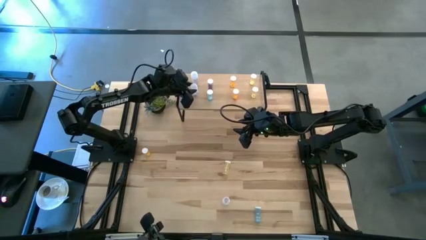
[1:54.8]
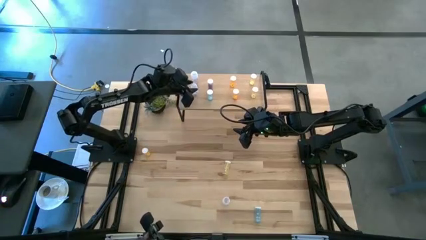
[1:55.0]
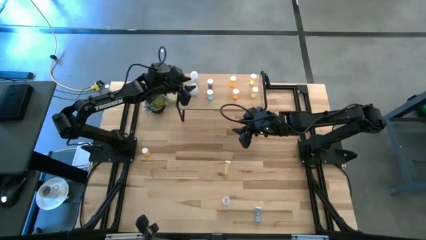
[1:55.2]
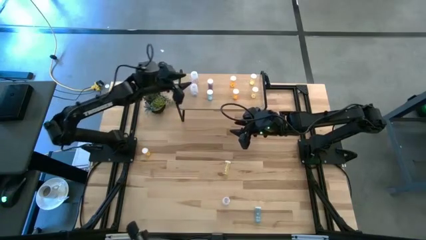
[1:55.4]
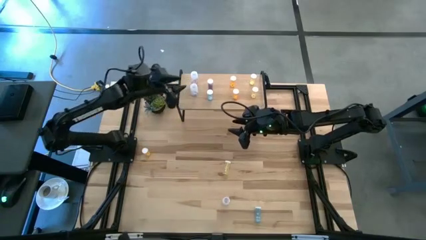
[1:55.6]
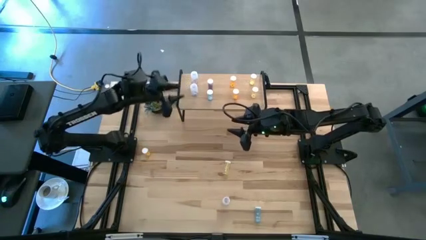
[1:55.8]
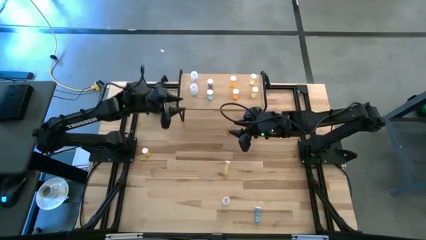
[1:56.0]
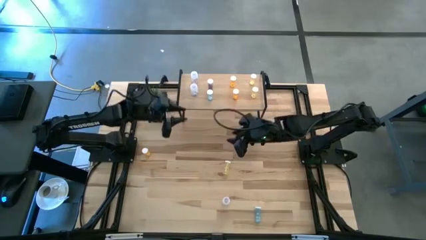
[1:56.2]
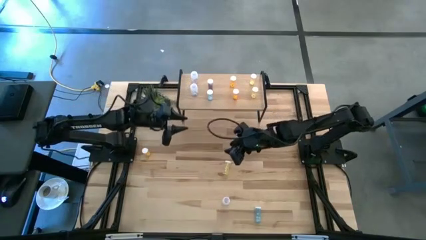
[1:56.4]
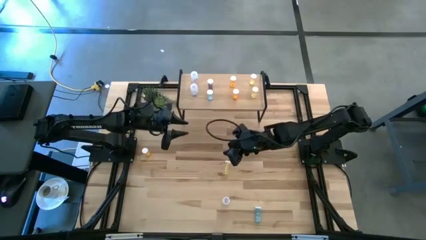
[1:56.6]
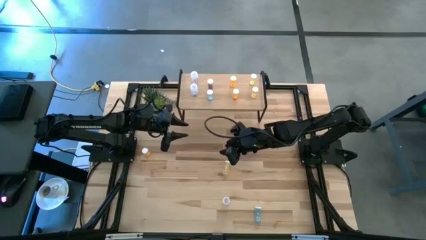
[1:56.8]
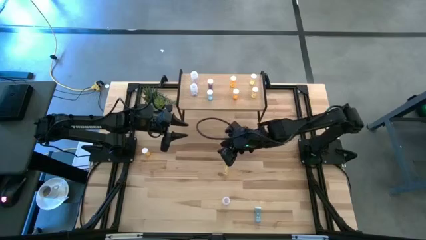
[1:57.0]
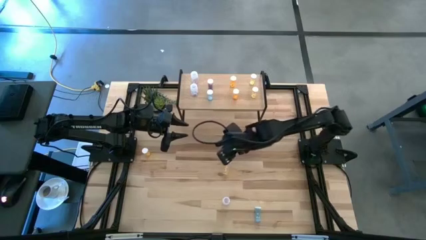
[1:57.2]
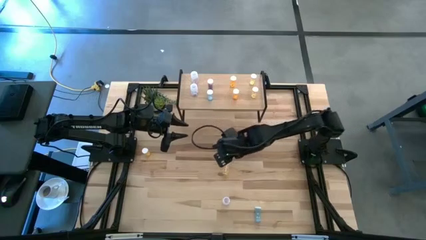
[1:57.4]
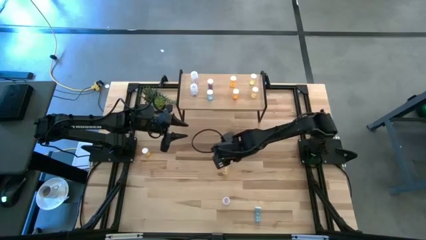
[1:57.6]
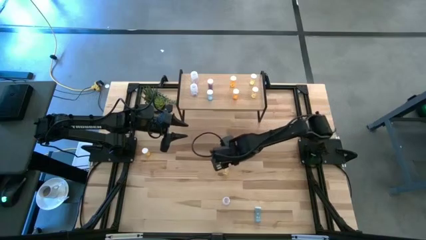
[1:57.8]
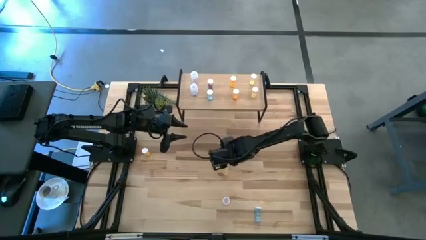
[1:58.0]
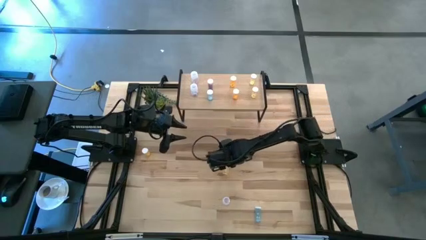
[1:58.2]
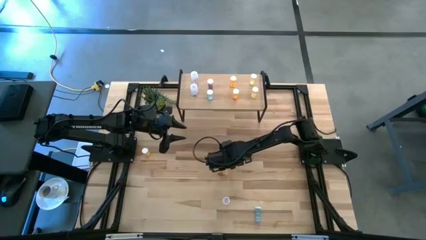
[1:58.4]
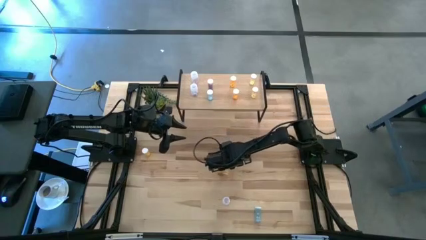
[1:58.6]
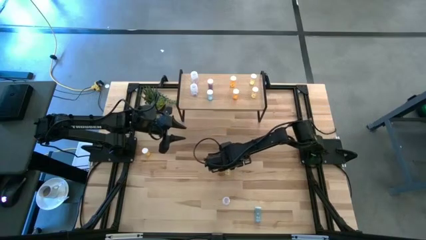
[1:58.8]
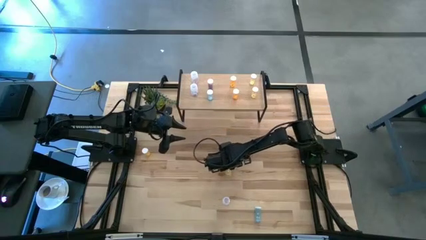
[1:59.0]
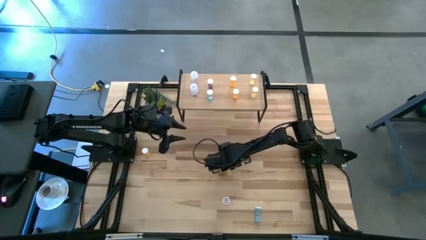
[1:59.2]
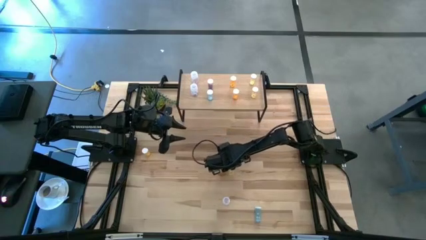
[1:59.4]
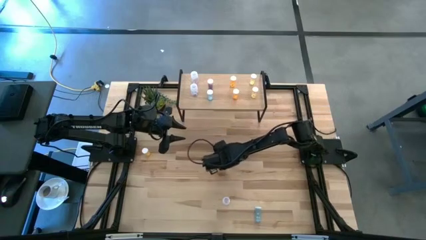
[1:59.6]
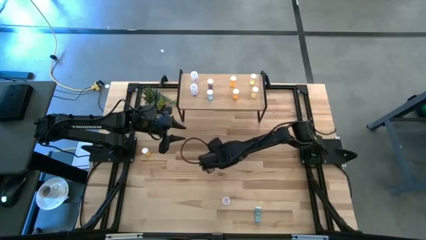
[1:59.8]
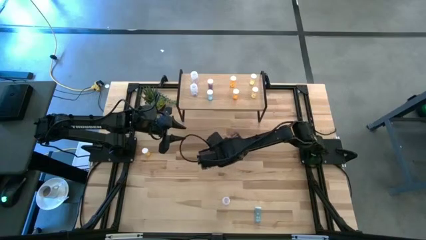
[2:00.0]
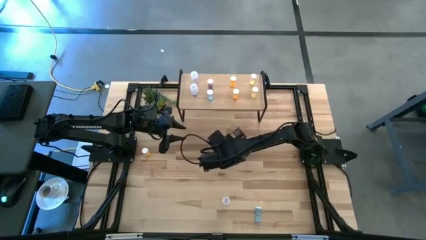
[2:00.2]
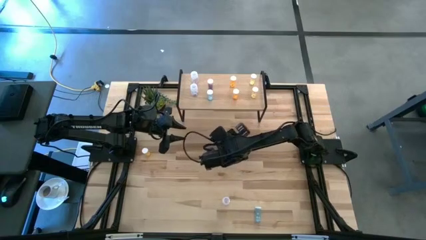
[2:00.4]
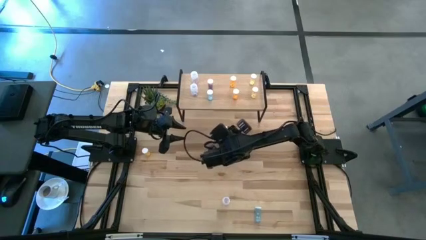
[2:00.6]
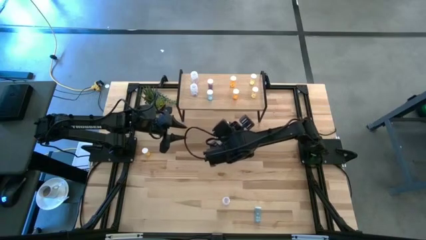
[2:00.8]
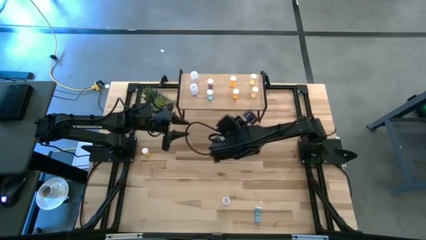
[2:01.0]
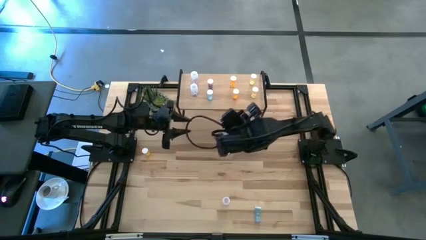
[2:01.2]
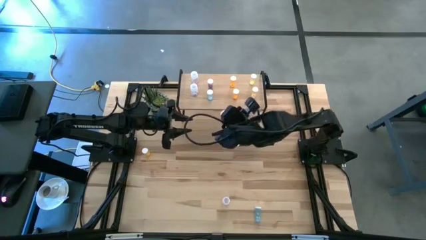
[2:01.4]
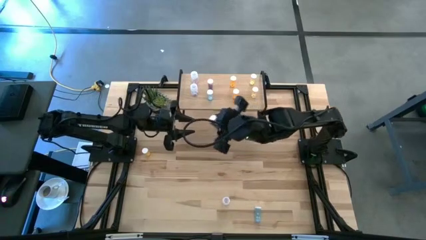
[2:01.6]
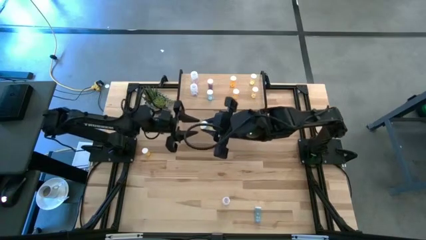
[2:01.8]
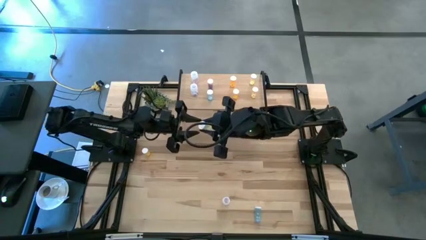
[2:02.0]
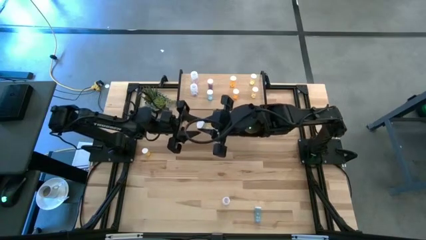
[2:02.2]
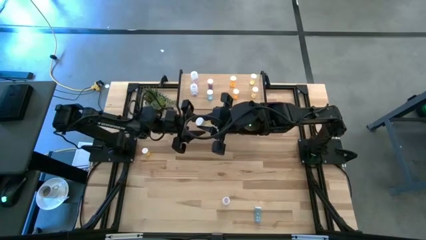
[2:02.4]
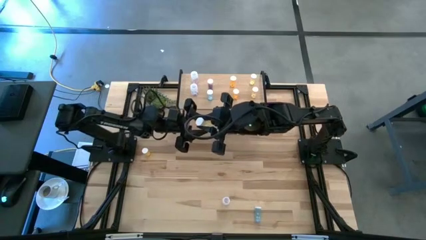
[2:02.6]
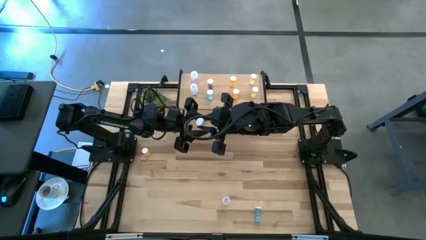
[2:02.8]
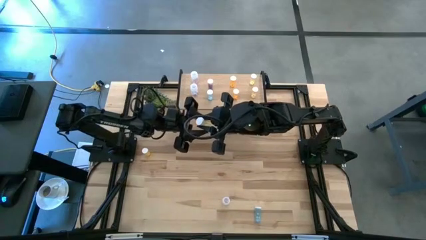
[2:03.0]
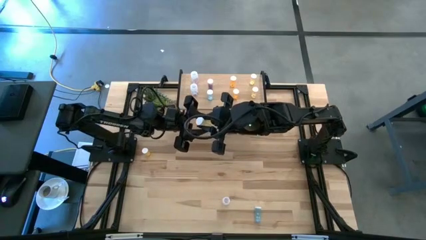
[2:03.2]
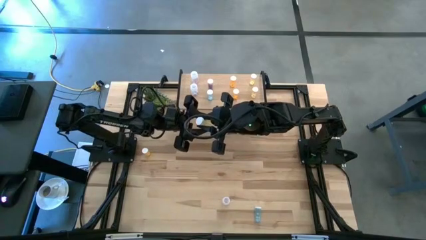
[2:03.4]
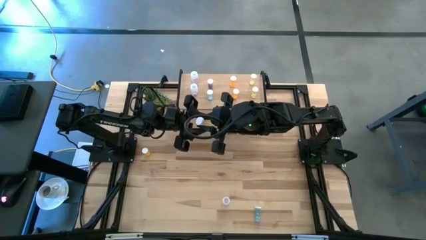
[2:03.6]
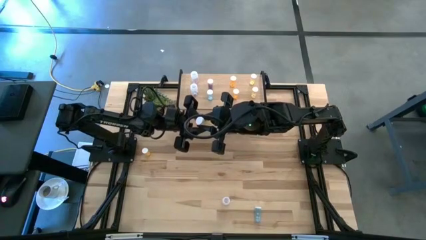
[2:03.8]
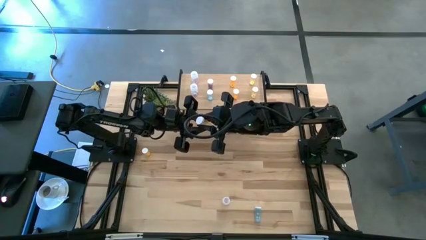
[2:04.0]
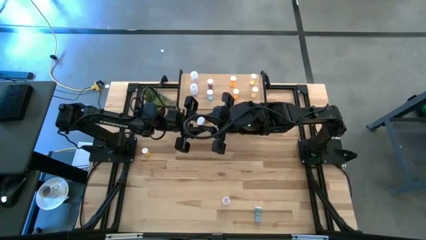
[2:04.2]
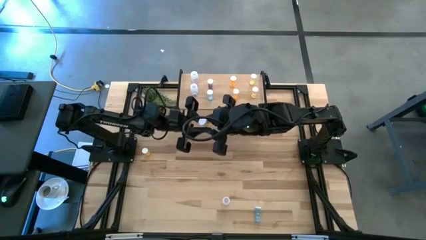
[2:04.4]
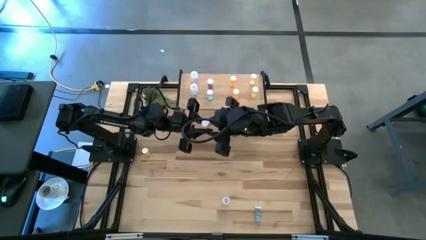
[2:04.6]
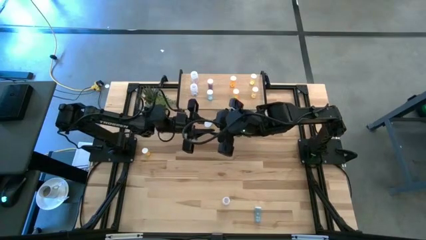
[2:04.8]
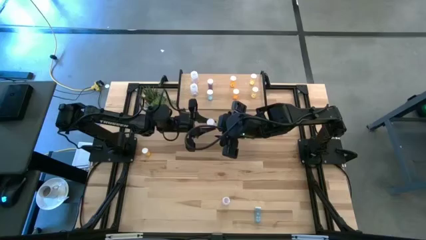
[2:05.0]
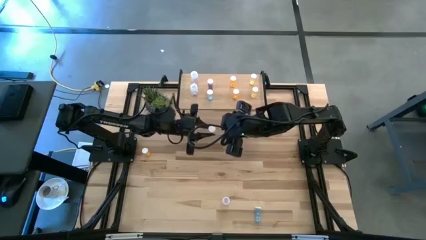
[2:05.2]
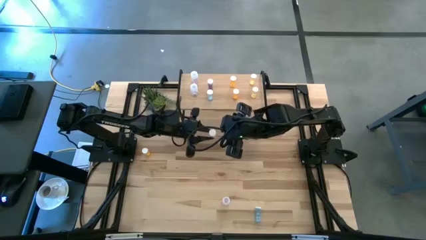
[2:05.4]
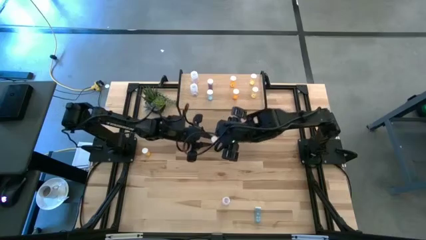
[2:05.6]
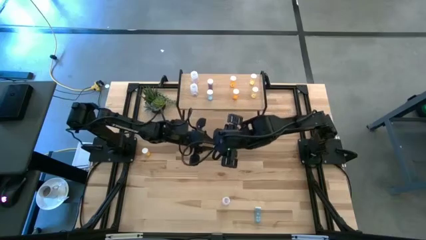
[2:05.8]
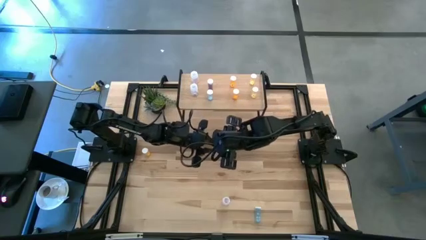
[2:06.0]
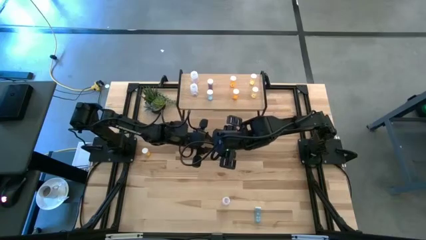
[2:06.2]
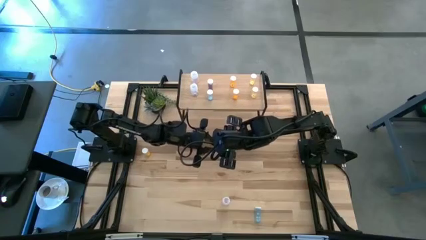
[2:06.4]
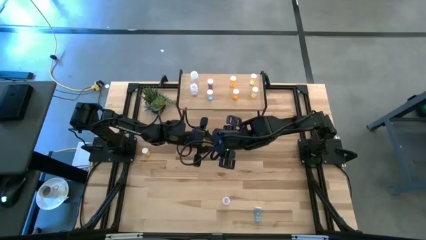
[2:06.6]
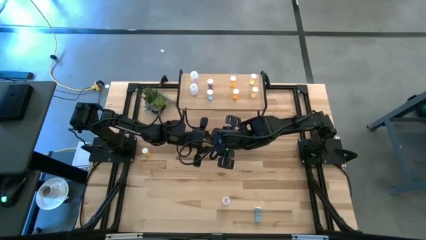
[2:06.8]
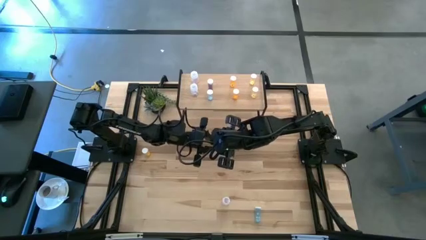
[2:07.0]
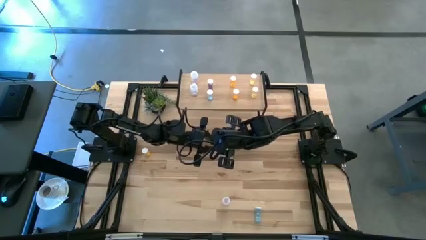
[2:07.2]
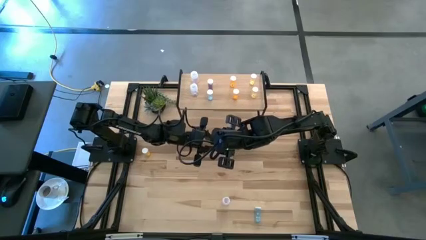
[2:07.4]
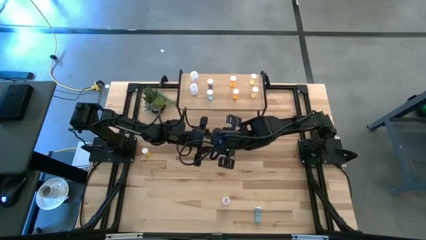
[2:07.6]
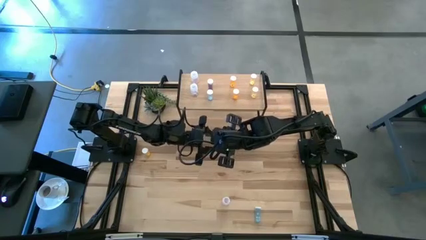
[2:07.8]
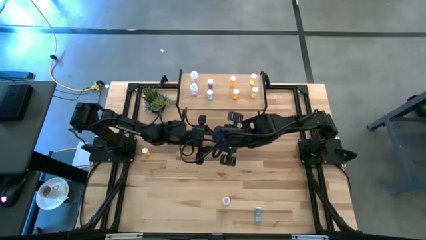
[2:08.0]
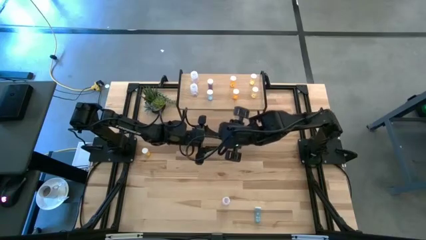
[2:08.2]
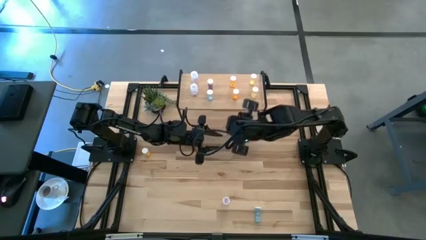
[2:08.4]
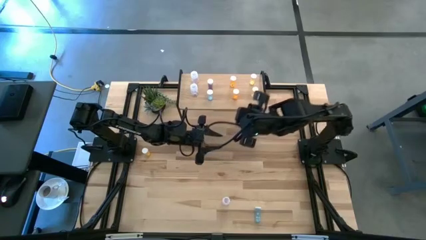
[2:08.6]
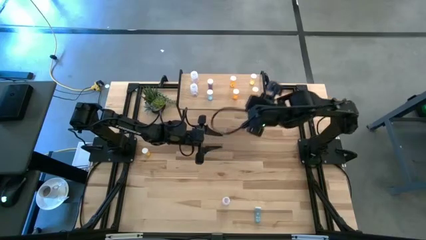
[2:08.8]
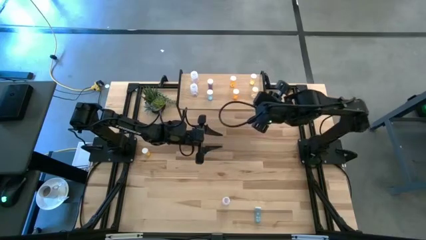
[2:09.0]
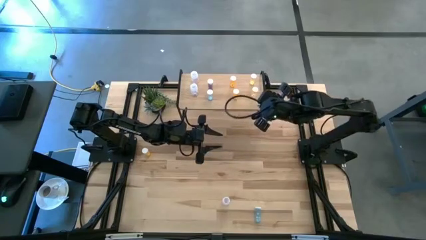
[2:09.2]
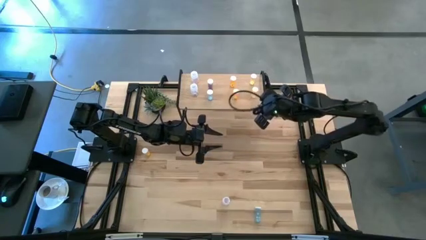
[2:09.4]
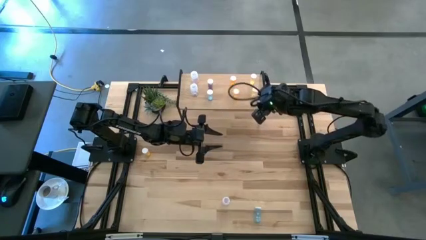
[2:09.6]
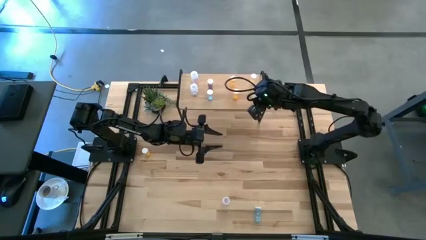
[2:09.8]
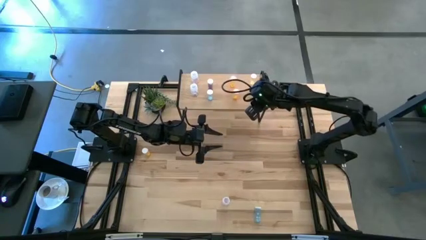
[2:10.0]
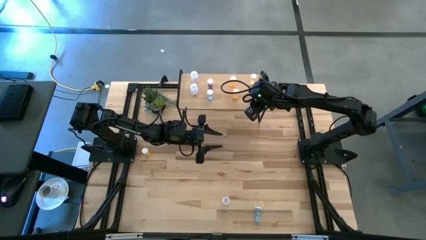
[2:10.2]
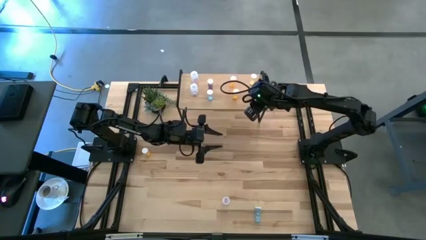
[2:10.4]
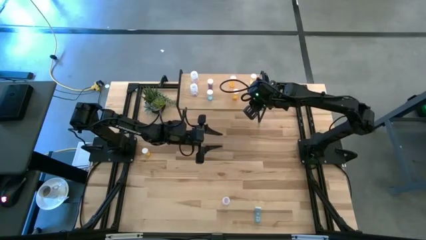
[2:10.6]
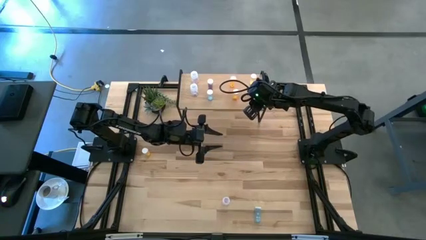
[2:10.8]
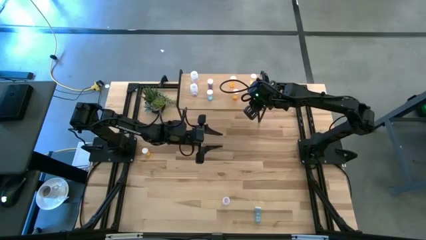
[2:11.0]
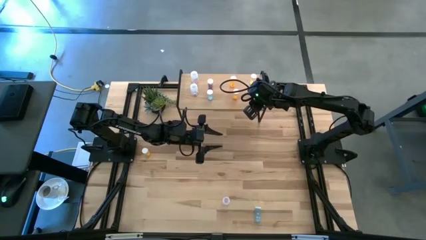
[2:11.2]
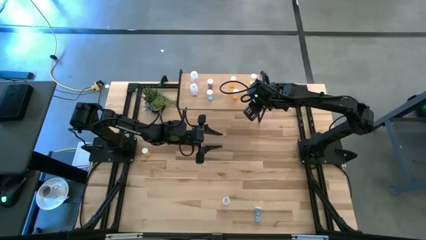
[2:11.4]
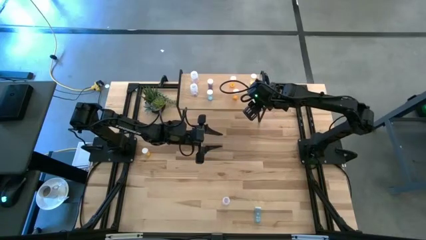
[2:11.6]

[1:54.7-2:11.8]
Task: Pick and place medicine bottles onto shelf by color
Put the yellow pill bottle on the shelf aligned with the yellow pill bottles
